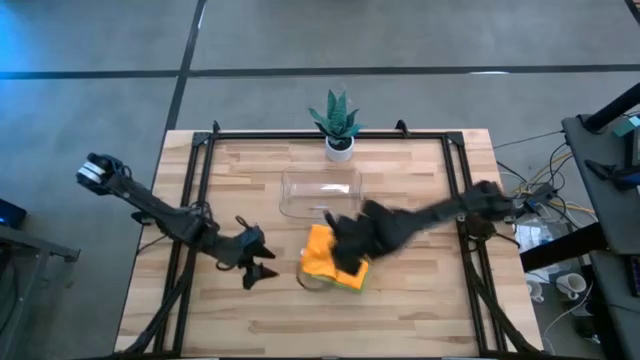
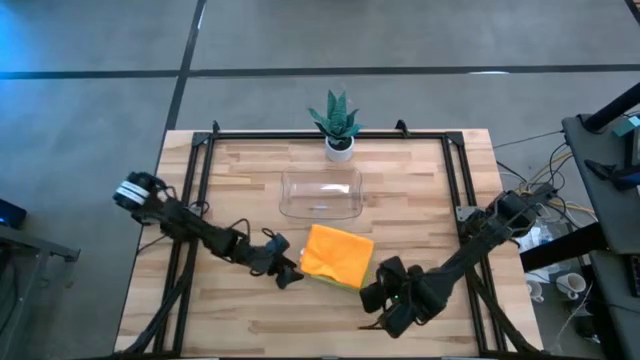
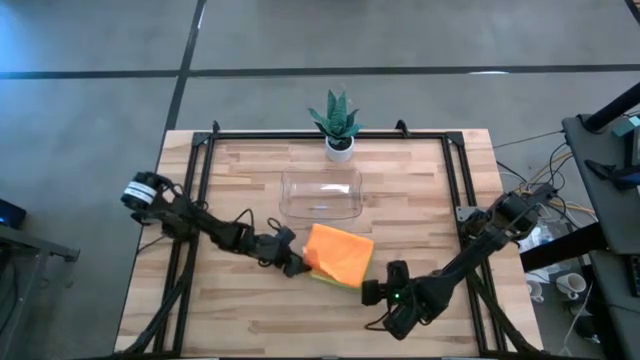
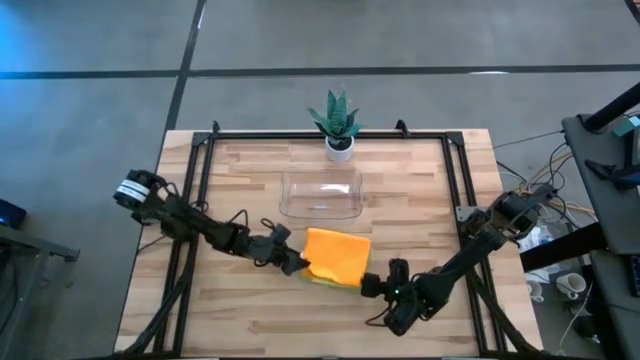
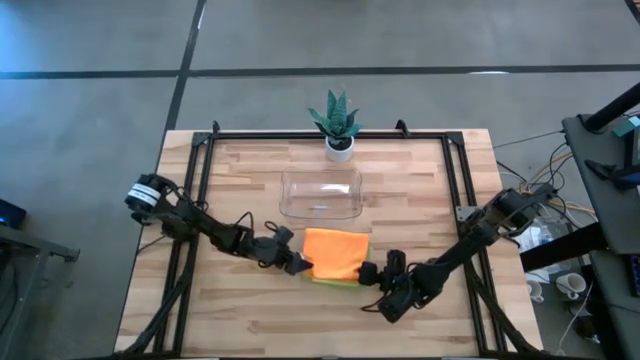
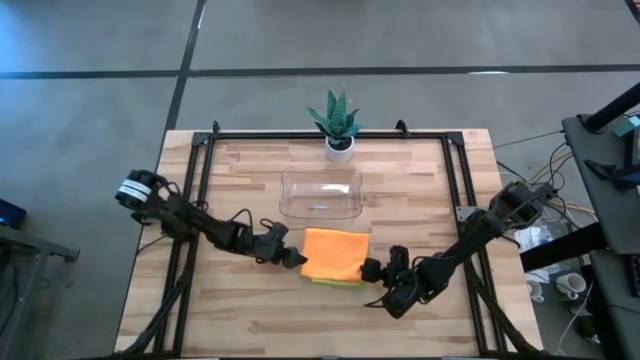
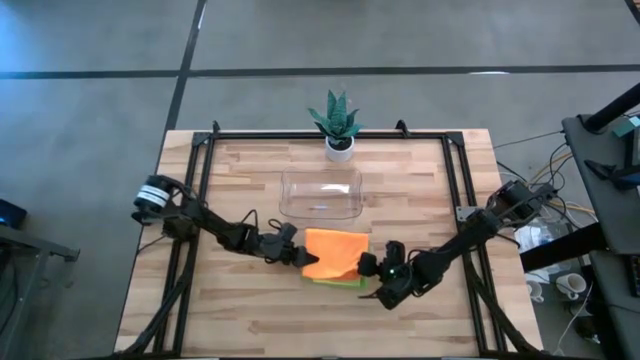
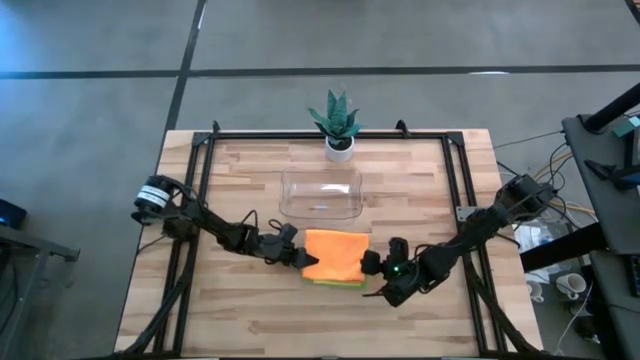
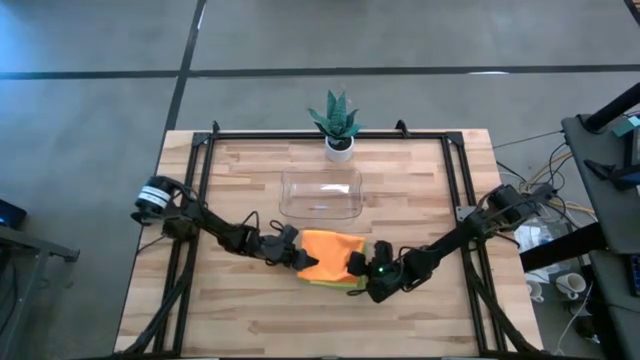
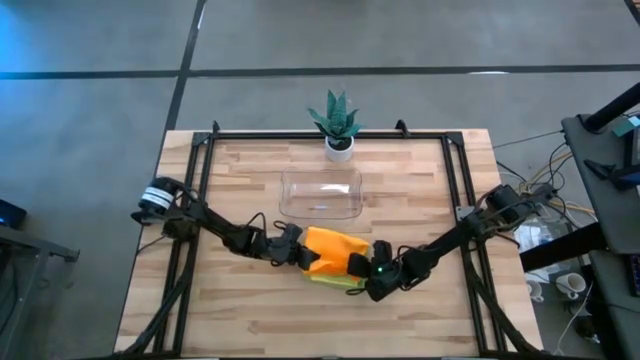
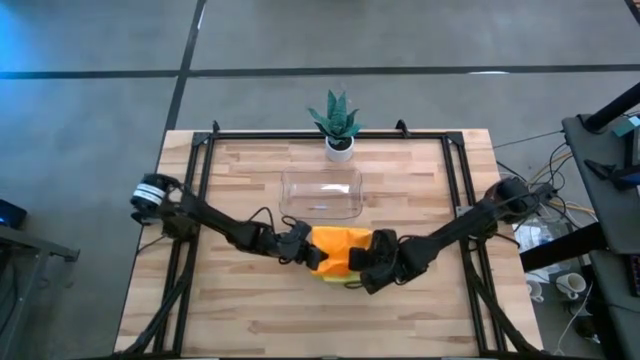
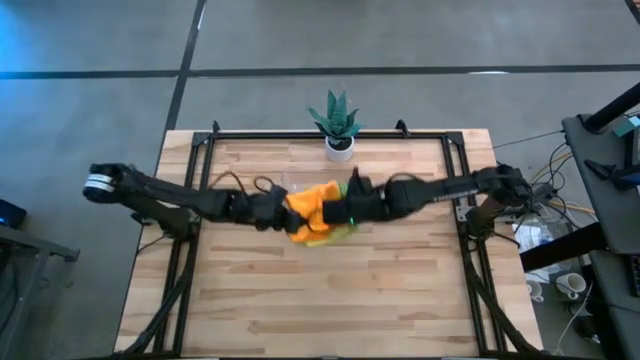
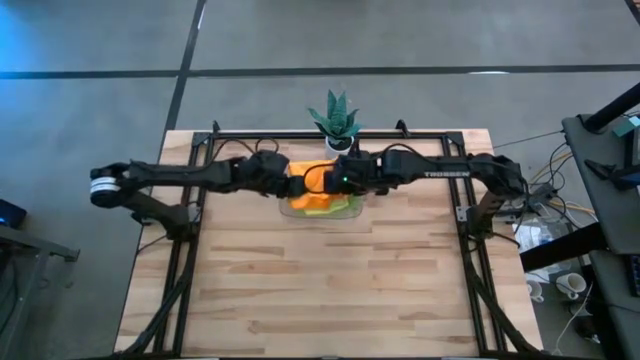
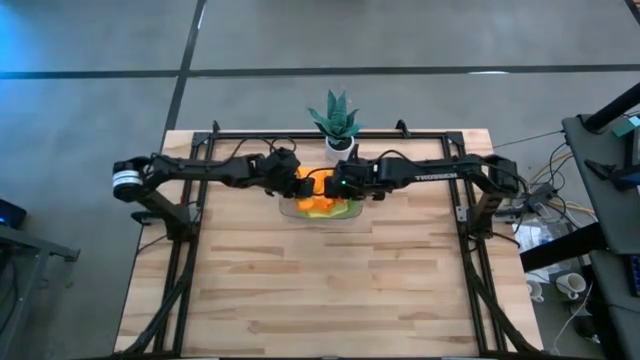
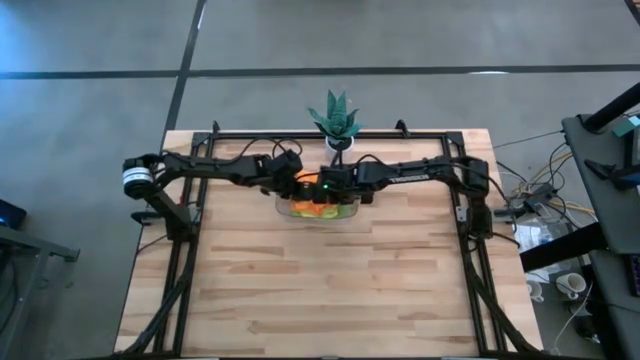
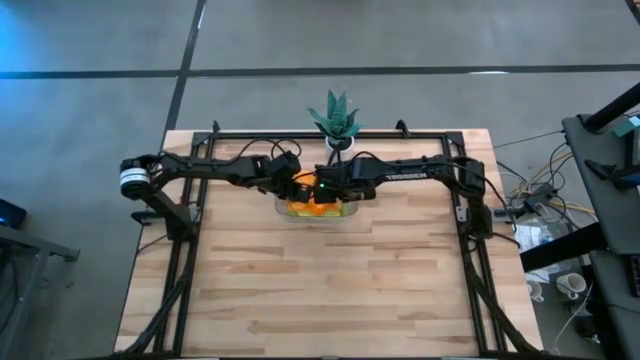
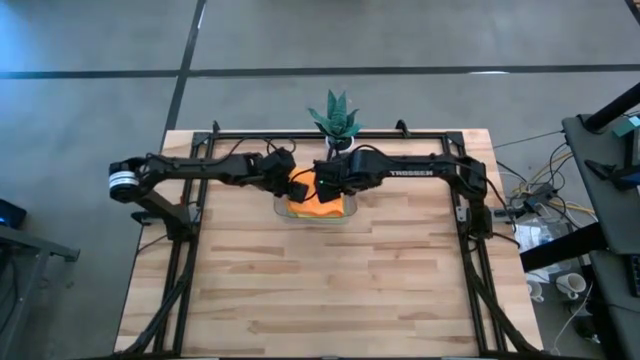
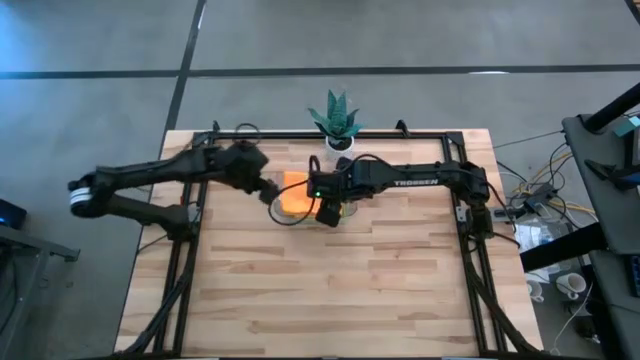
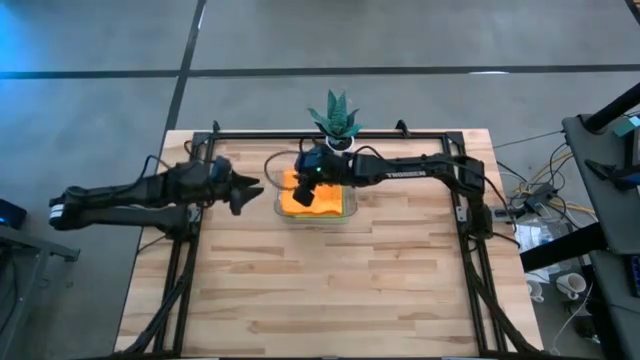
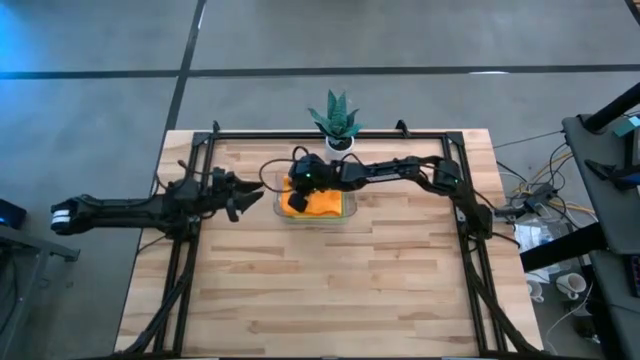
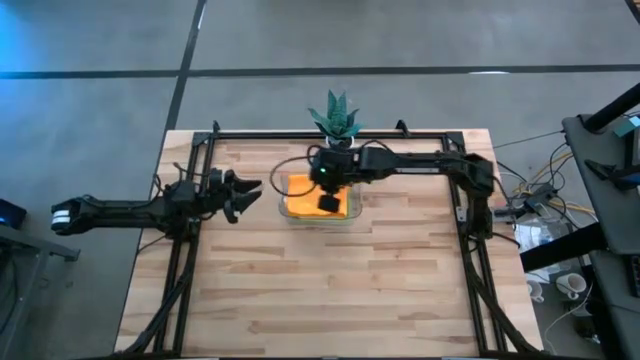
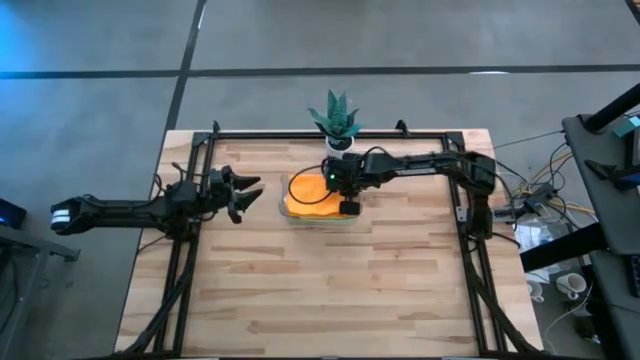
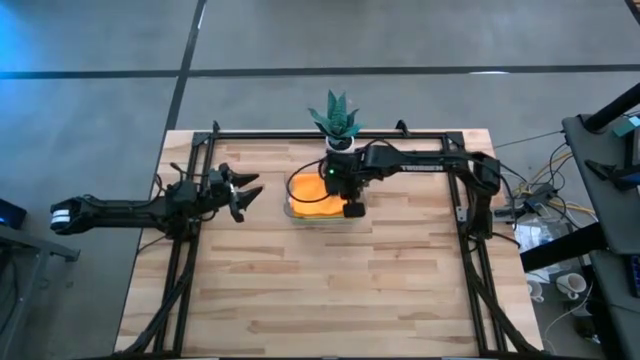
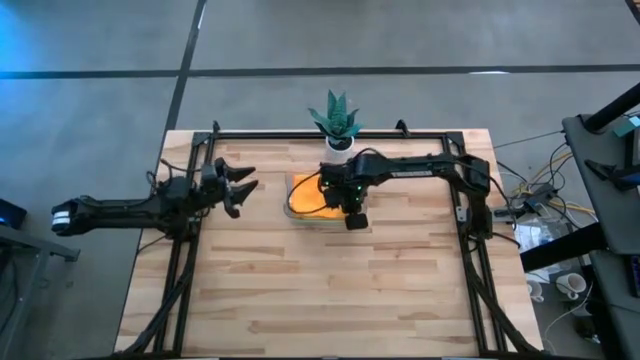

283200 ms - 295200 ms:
Task: Fold microfiber towels
Put the towels into the transparent bin

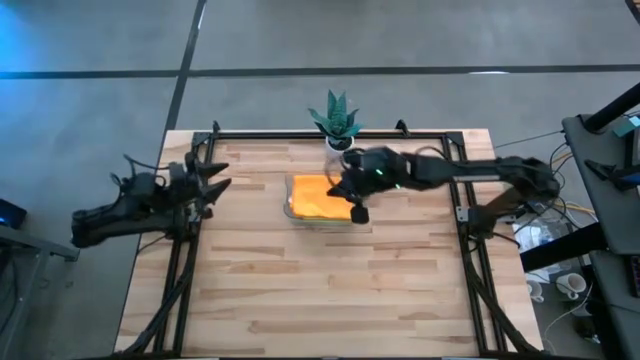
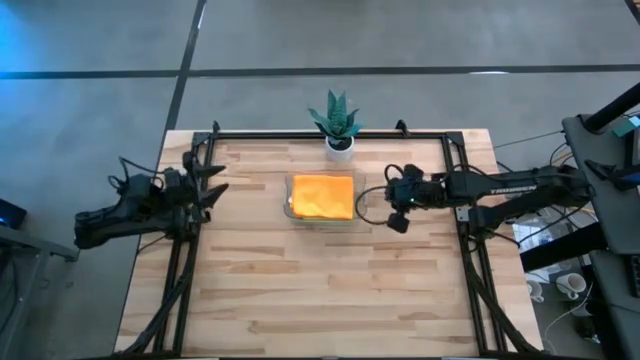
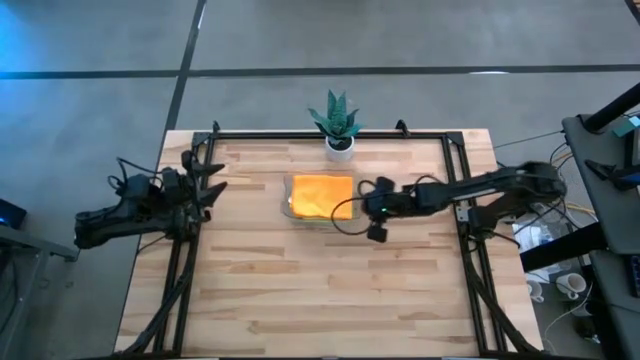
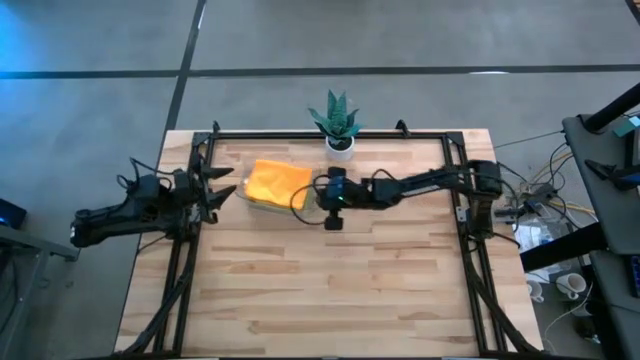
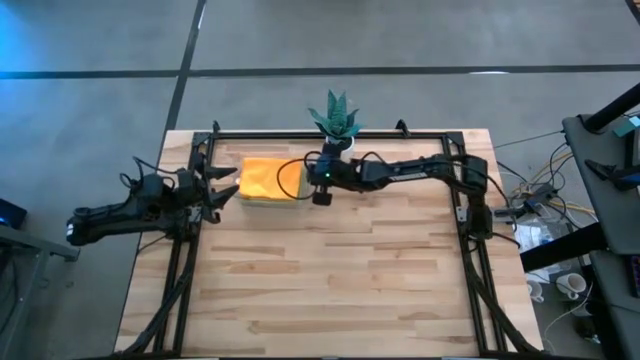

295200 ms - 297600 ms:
Adjust the bin

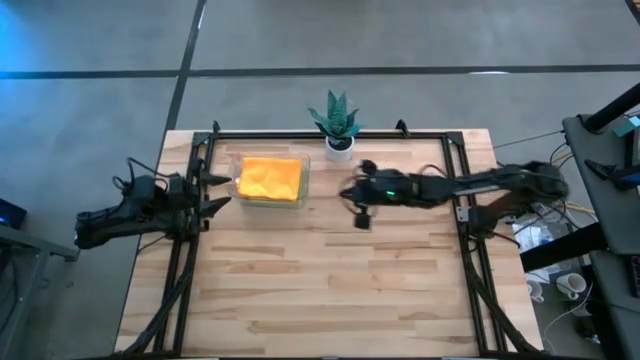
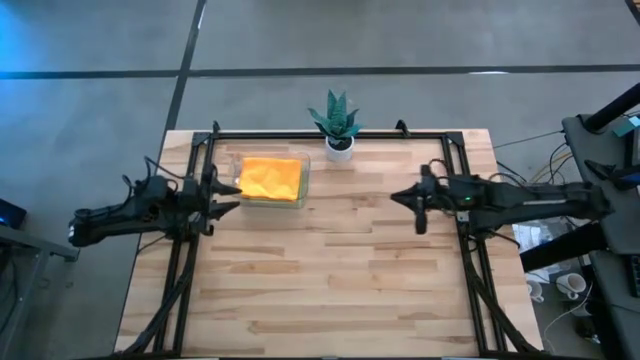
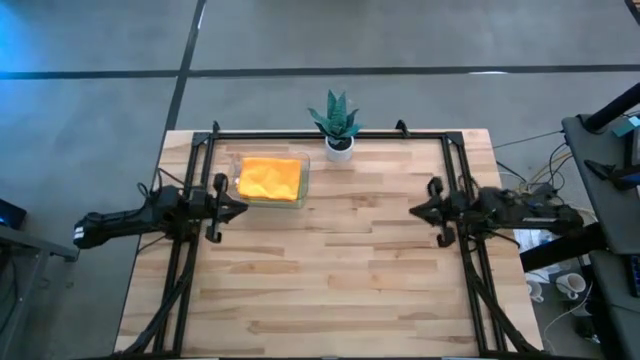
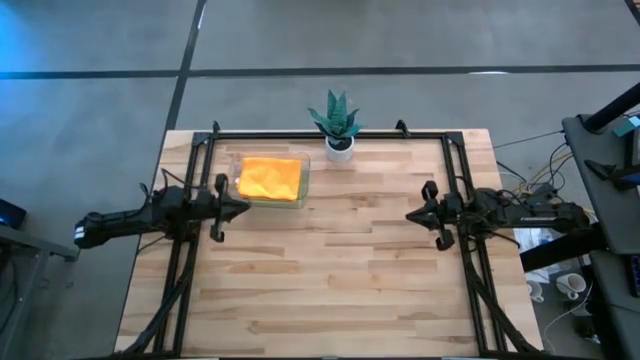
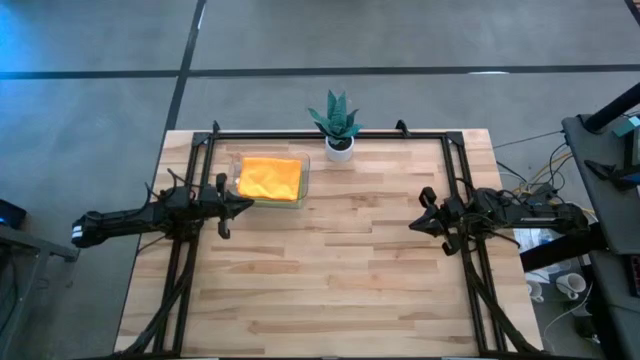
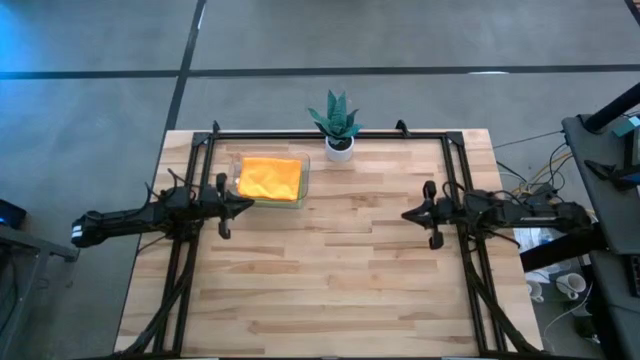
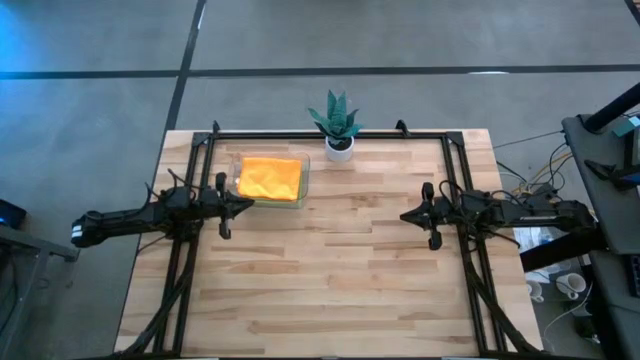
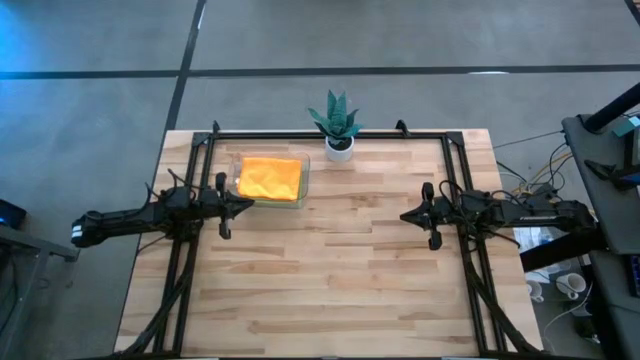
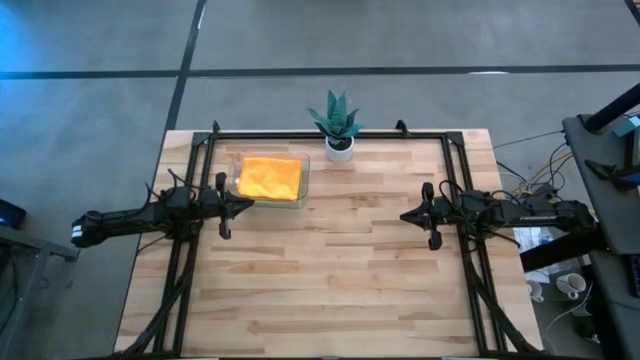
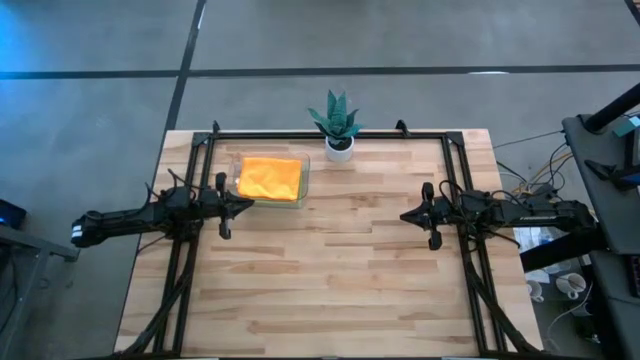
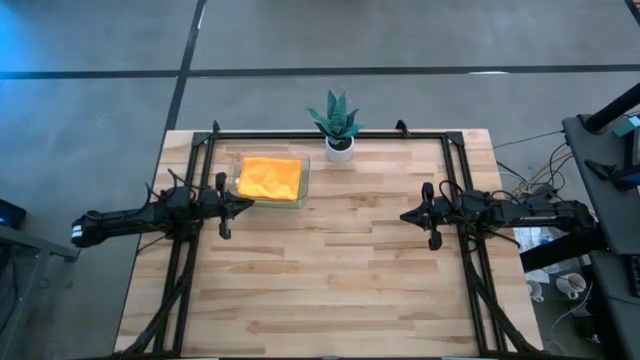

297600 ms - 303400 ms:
Return to Home Position

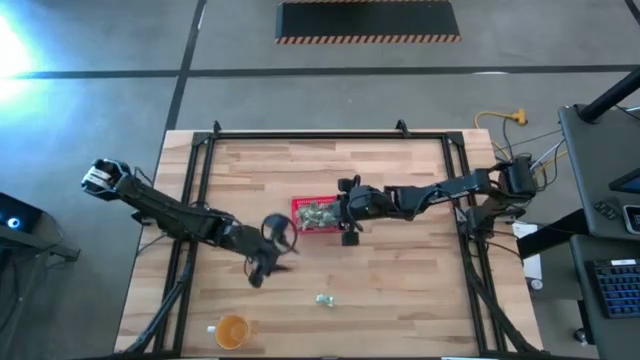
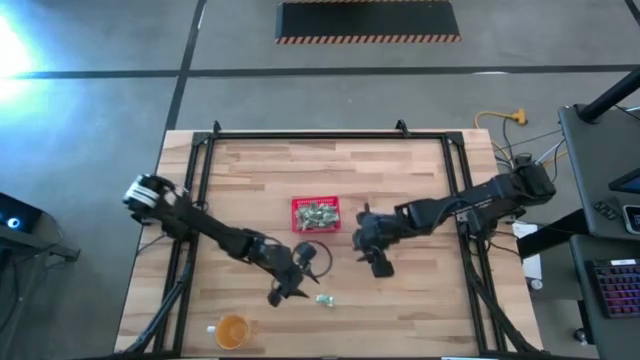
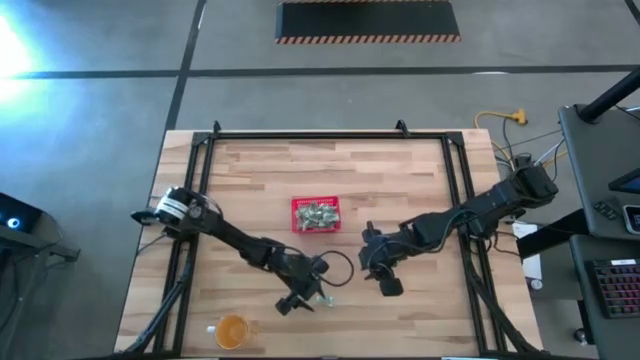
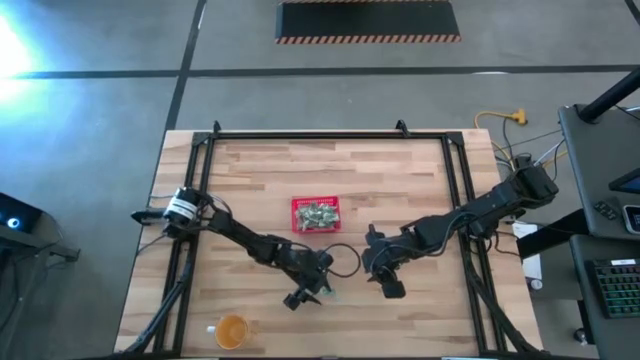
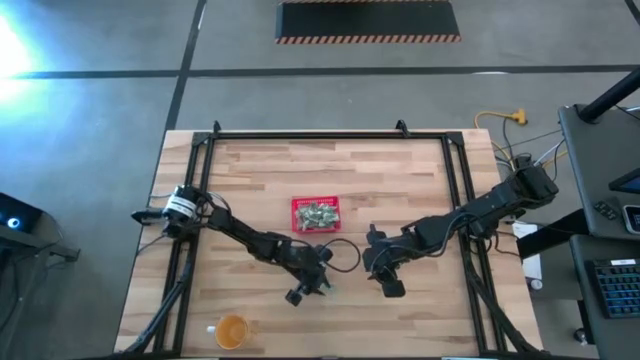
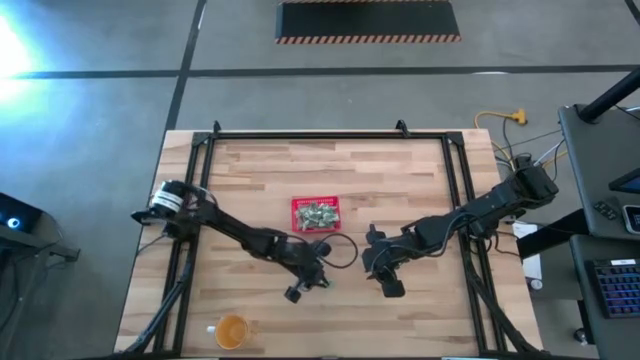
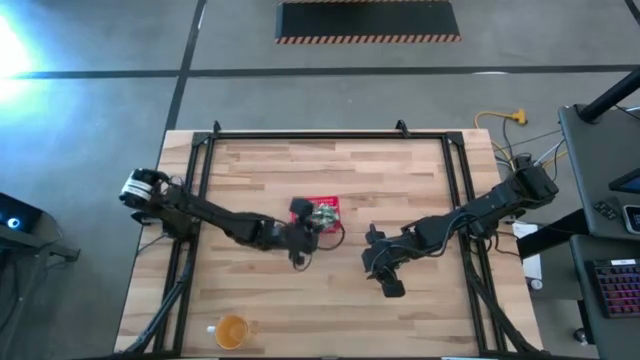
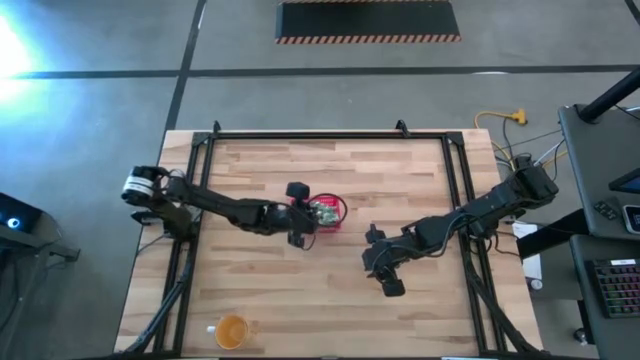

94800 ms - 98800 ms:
Task: Pick and place items into bin
Put the stevia packet into the red bin
